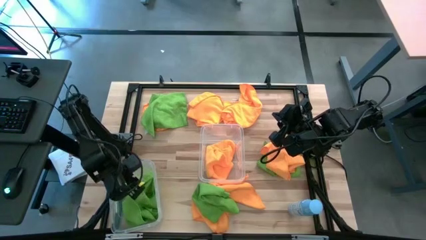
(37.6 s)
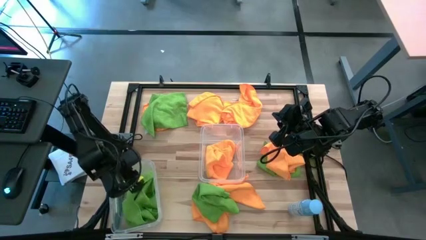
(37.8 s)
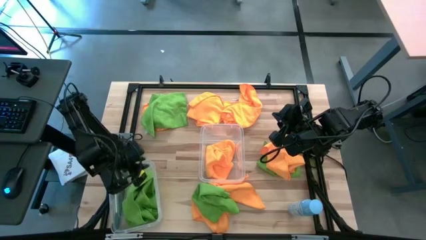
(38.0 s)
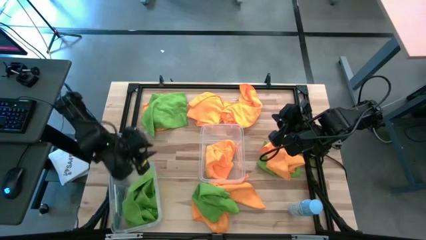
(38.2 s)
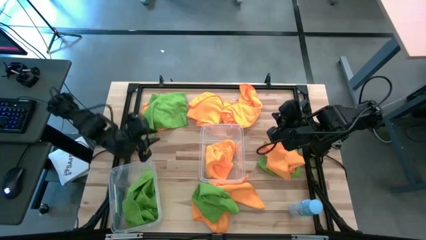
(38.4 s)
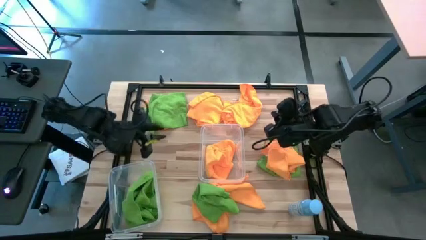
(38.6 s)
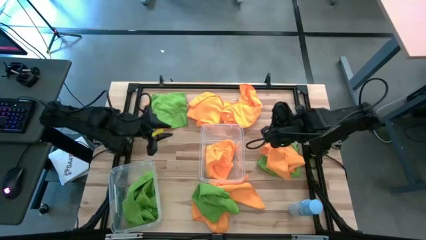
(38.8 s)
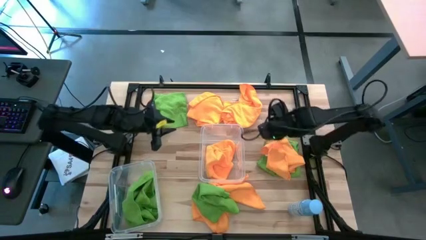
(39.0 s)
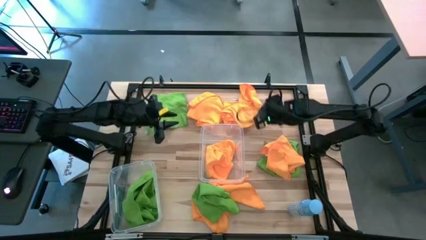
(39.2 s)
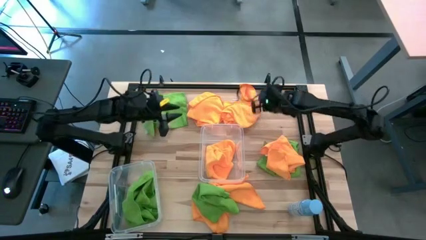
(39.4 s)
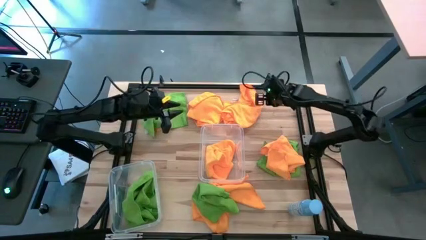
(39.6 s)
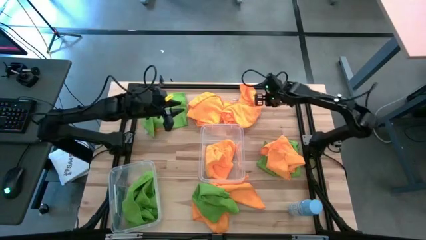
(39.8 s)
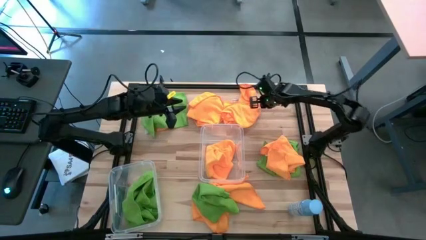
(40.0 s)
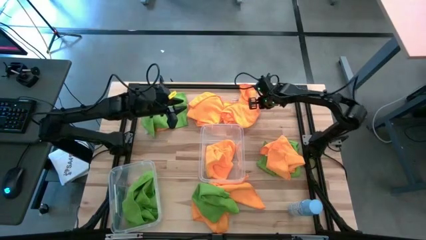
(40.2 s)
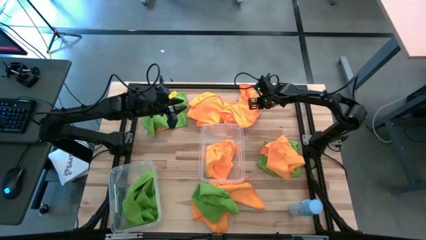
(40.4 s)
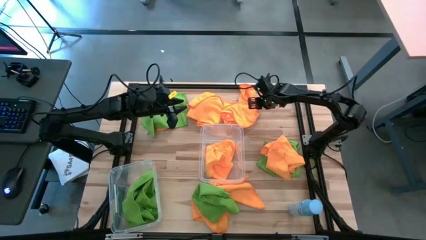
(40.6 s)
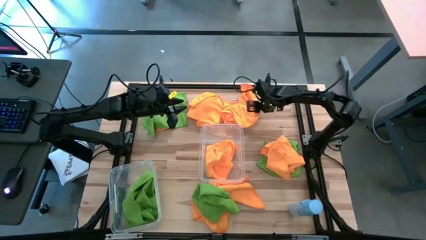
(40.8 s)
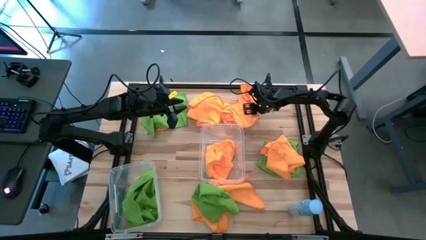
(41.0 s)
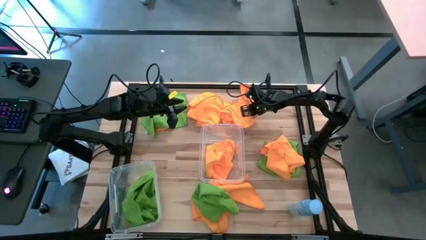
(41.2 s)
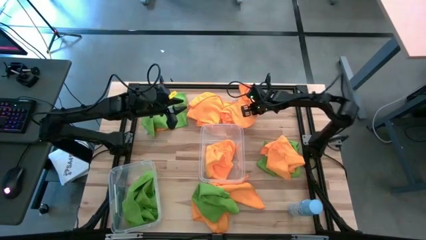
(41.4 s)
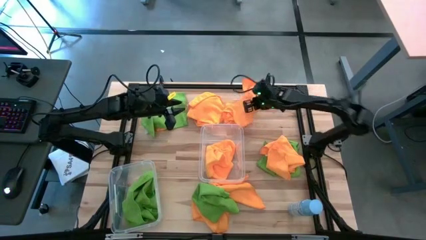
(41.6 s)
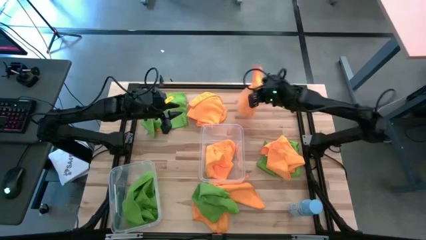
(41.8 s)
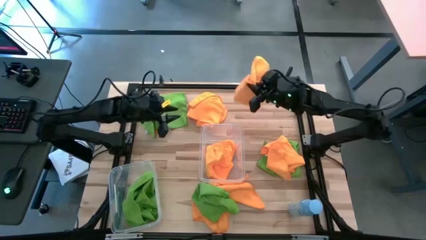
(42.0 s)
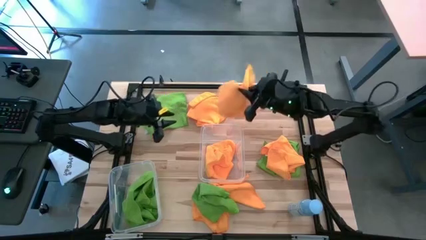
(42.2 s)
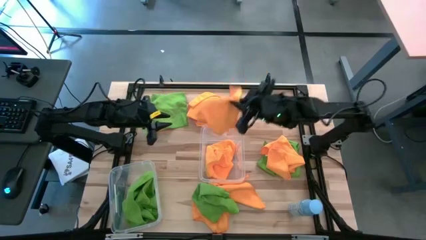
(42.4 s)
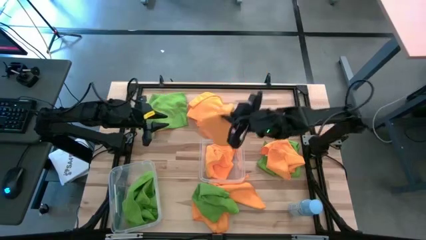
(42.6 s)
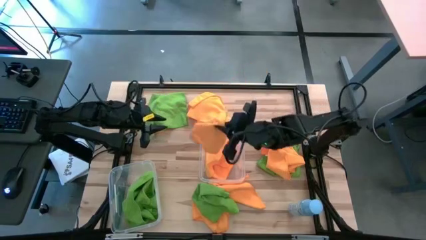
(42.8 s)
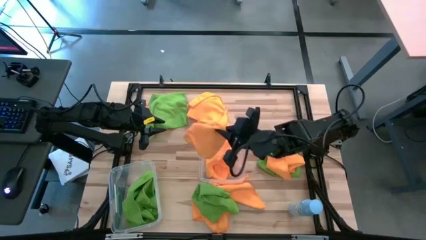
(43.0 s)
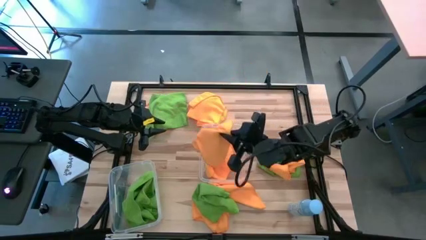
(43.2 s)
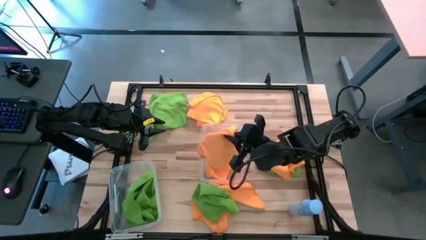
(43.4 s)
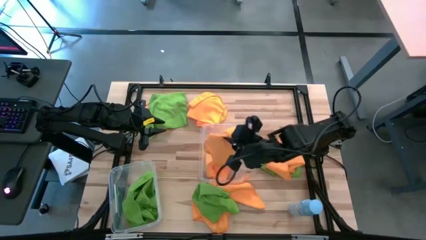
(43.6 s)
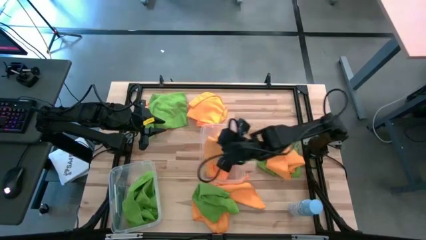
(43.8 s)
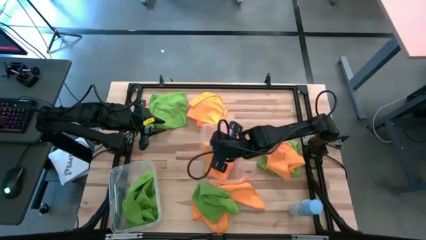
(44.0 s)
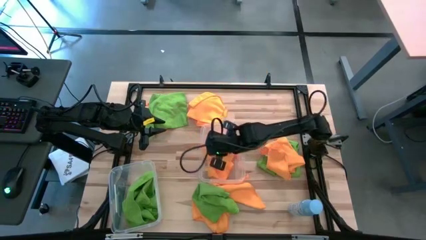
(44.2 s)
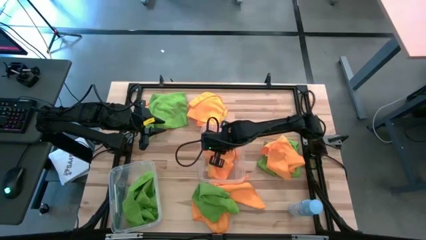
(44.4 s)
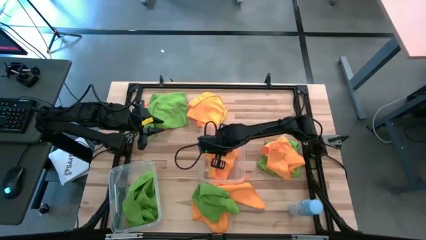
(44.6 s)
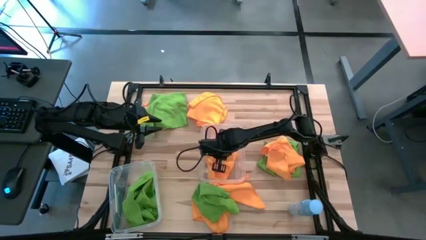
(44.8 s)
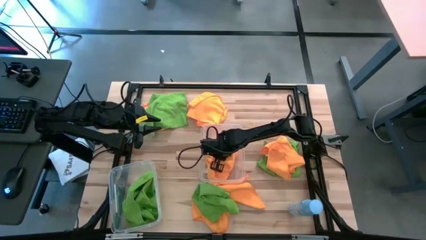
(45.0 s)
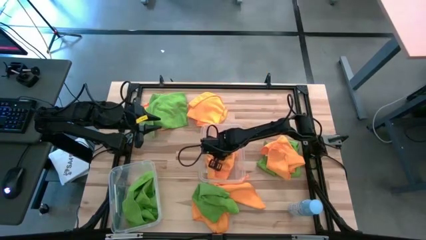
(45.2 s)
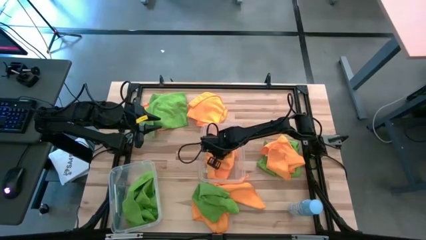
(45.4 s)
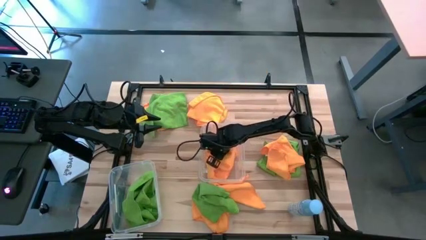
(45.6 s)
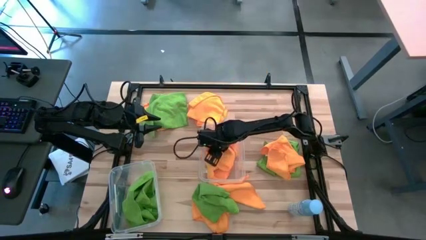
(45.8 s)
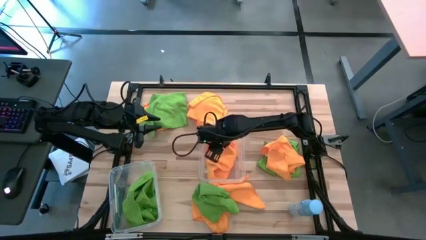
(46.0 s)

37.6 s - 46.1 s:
Task: Sort microfiber towel by color & place in baskets
Put the yellow microfiber towel into the right transparent bin

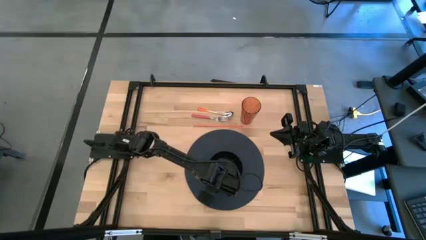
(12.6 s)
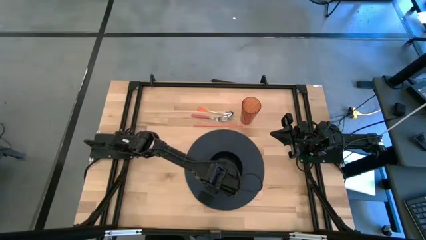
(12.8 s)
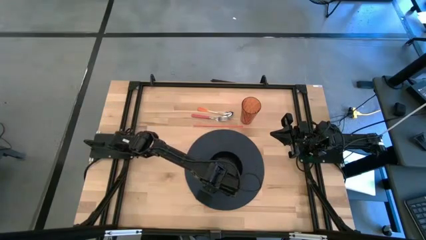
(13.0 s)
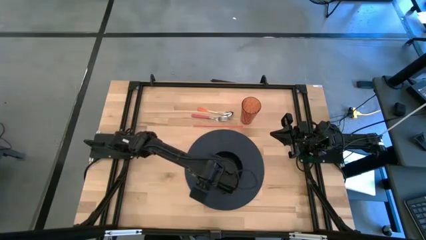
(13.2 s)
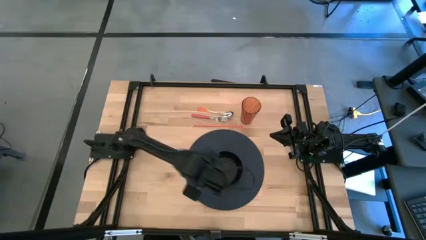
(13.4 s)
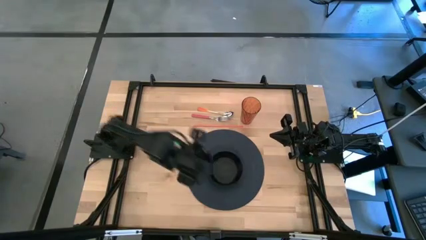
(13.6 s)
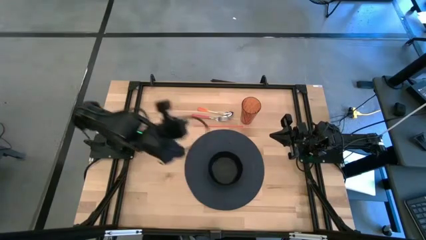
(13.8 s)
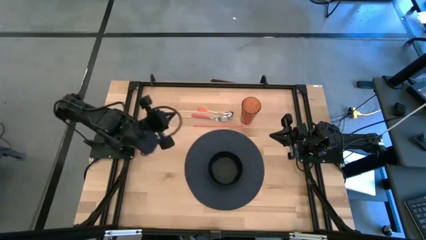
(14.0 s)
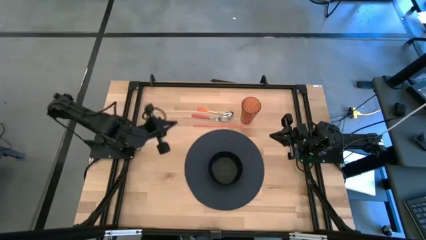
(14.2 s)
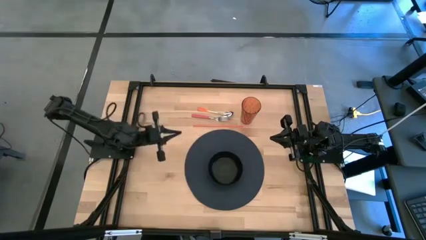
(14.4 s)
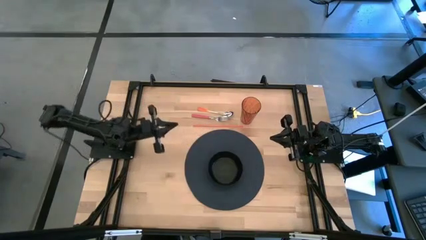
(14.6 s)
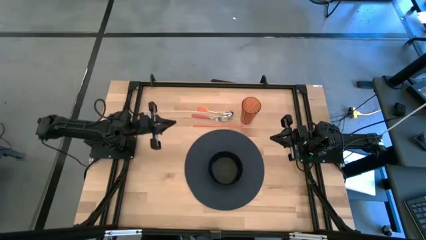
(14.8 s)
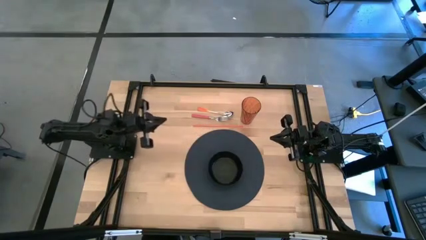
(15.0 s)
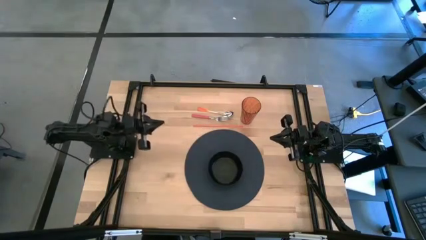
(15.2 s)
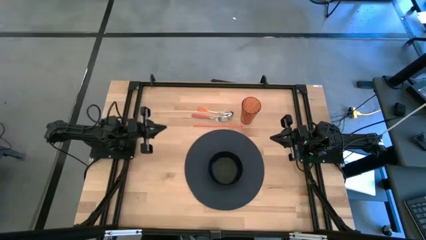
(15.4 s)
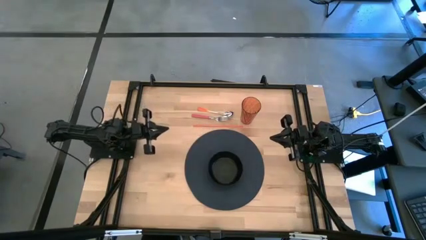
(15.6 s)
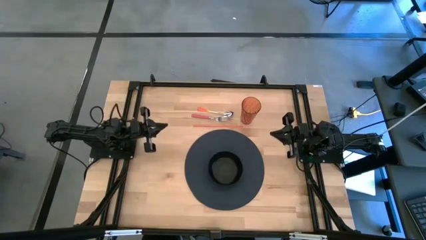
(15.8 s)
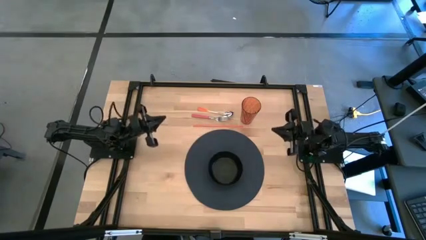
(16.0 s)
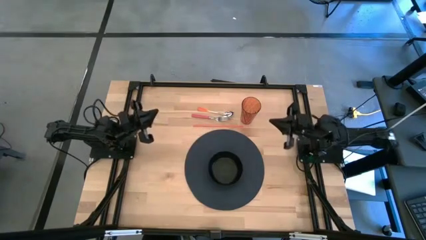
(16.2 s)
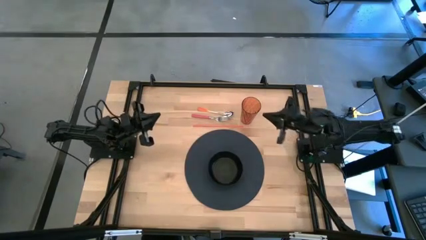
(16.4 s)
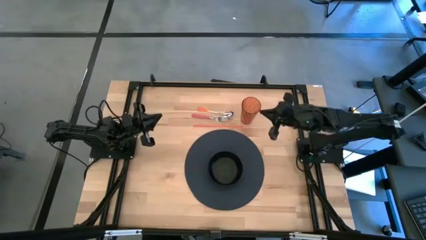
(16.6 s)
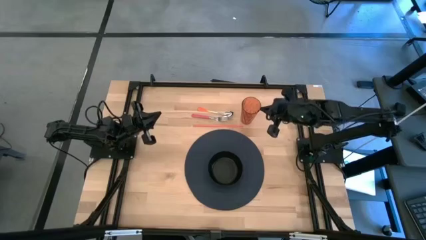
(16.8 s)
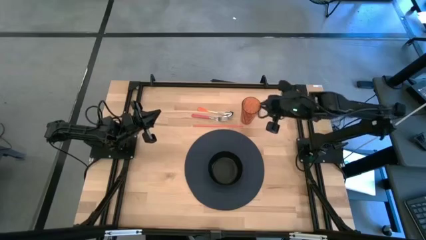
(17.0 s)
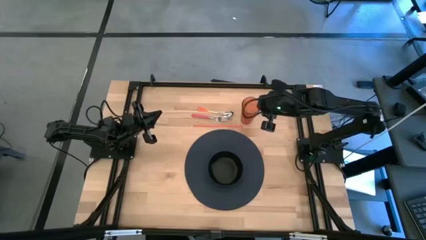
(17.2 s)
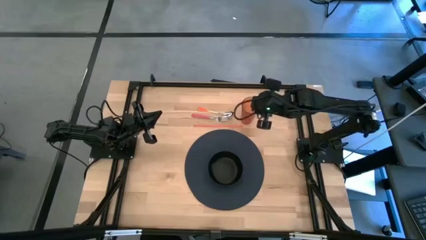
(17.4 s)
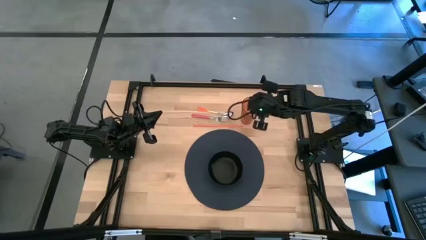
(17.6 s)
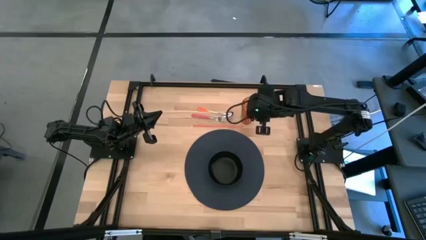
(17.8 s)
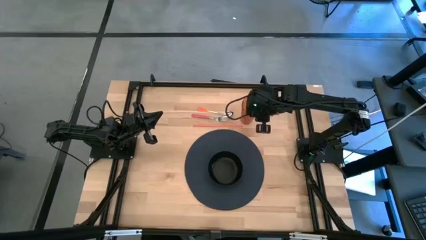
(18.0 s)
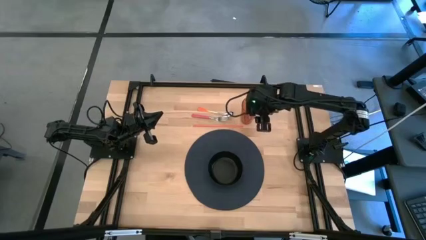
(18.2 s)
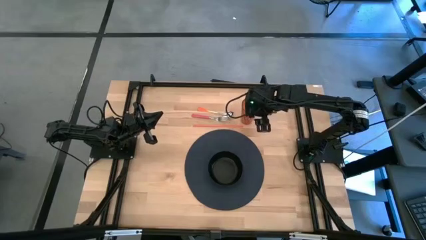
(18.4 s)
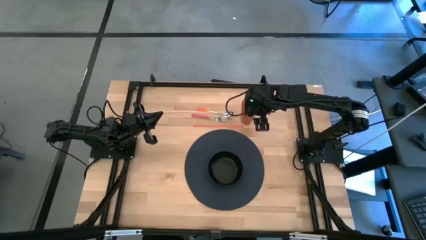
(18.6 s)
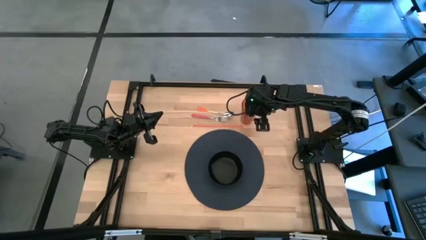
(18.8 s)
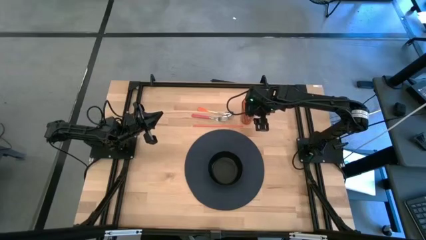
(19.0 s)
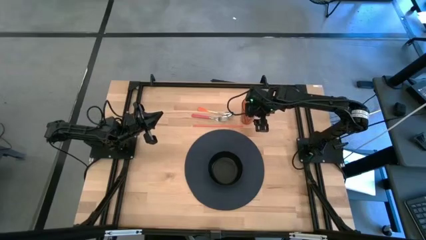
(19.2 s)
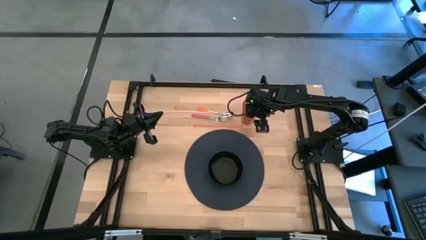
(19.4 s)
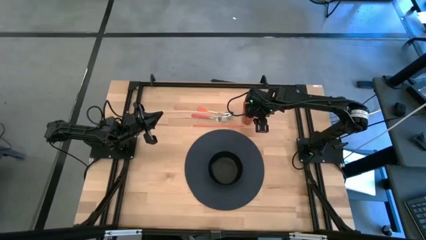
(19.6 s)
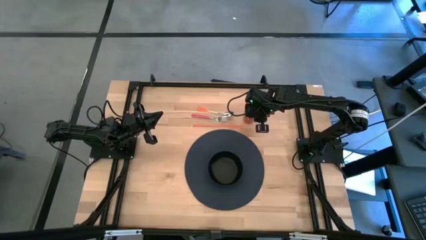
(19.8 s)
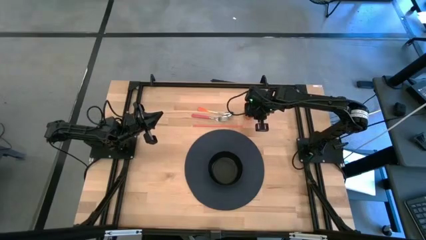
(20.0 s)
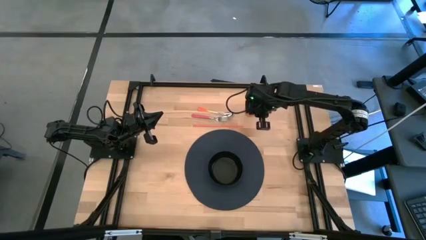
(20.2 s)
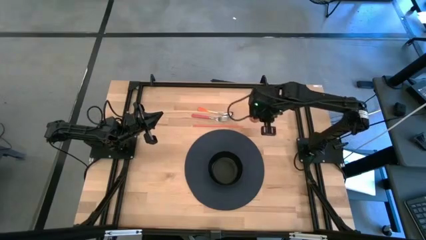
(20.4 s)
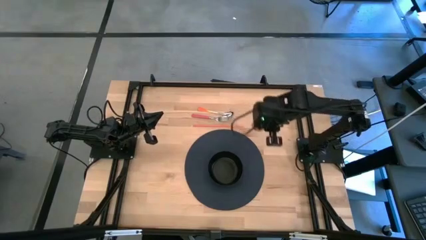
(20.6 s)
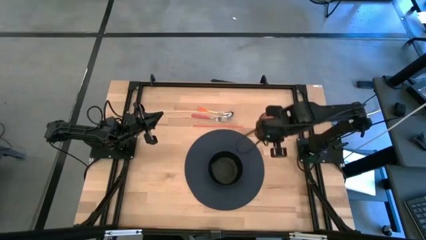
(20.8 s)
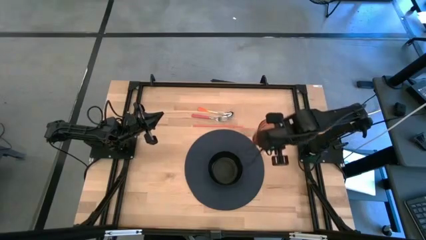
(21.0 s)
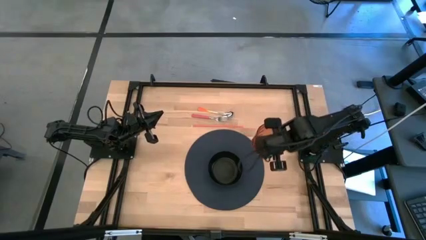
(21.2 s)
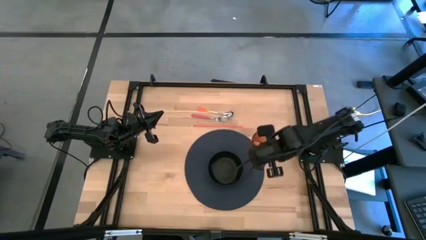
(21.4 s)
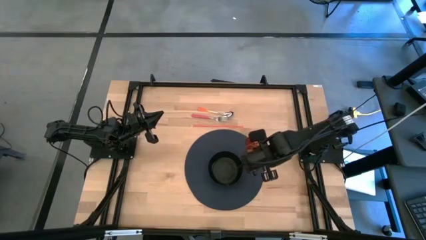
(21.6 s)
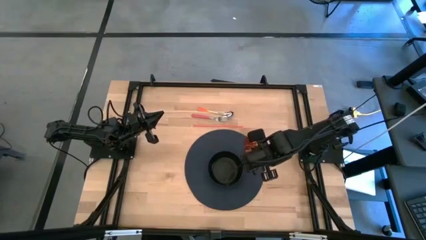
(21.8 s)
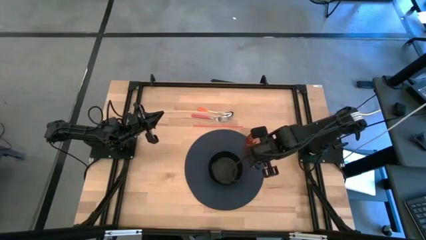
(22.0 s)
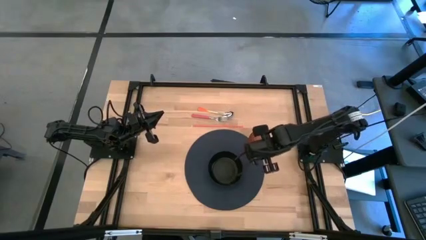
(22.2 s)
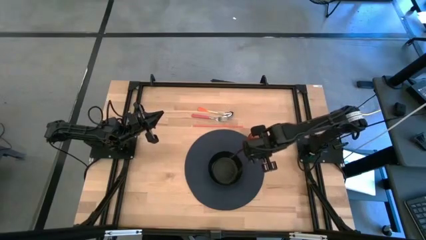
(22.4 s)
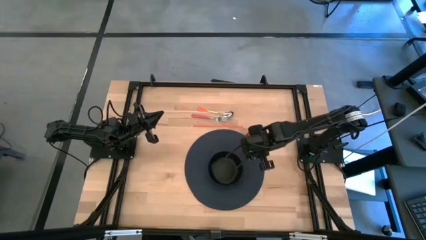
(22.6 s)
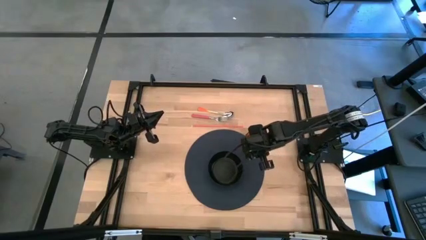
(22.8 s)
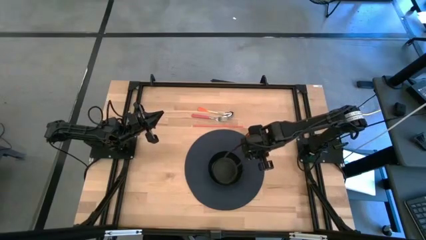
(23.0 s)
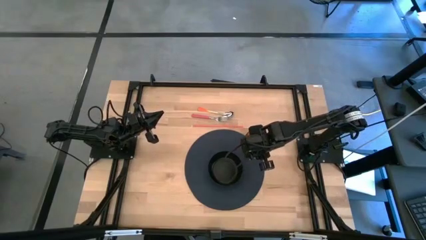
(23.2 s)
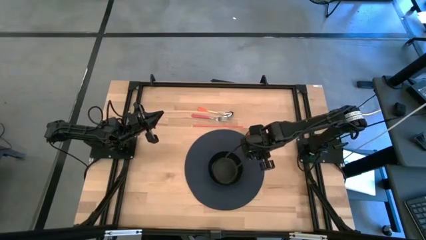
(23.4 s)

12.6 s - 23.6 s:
Task: Pick & Place Utensil
Put the brown cup on the blue mat to the top right of the black bowl
